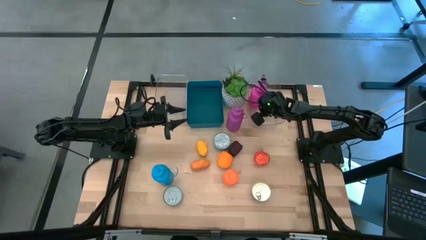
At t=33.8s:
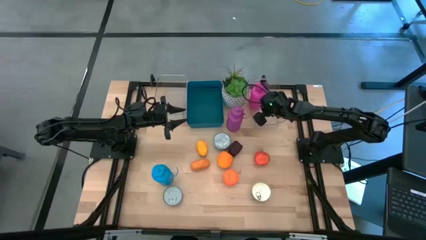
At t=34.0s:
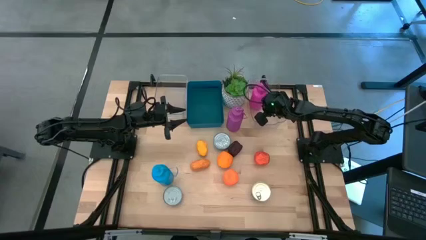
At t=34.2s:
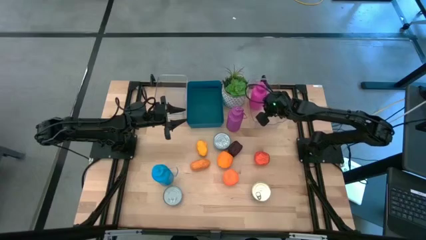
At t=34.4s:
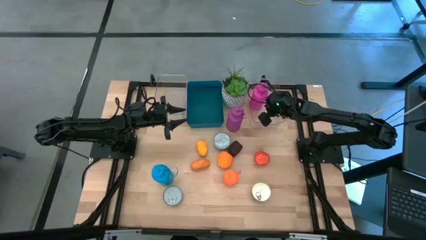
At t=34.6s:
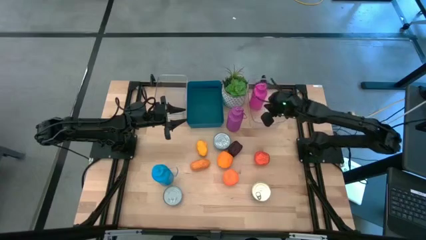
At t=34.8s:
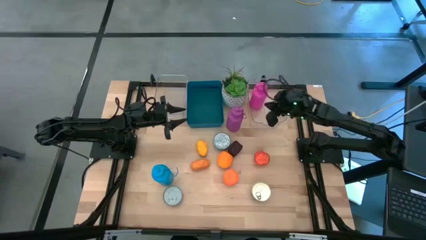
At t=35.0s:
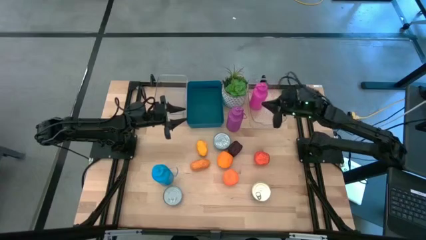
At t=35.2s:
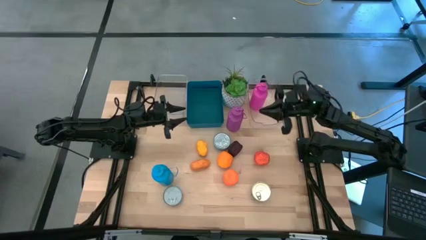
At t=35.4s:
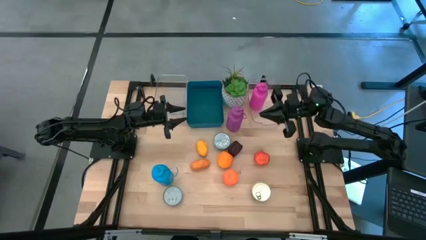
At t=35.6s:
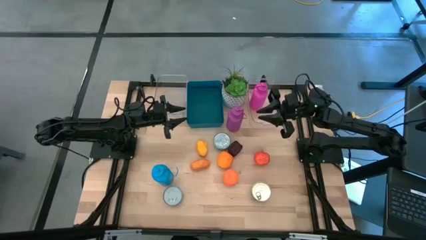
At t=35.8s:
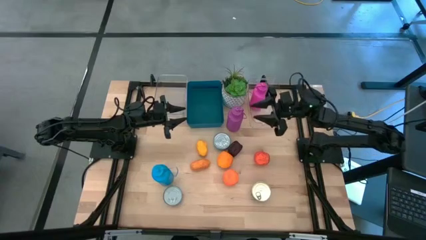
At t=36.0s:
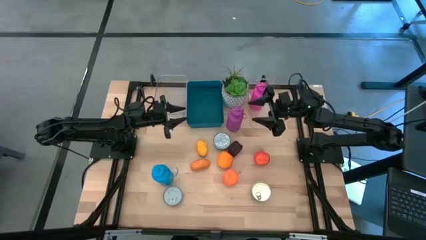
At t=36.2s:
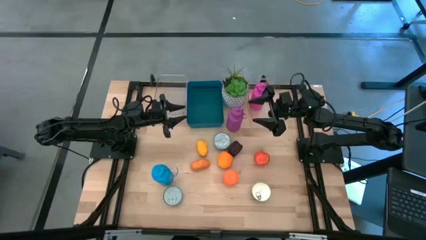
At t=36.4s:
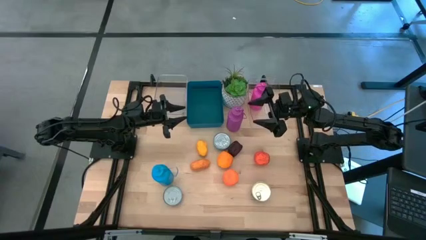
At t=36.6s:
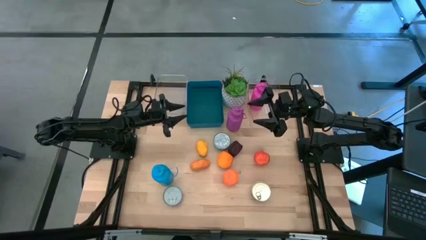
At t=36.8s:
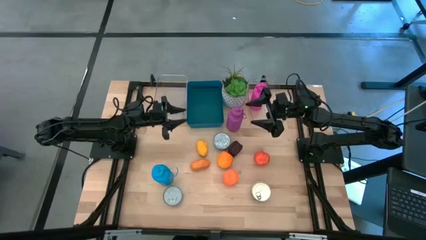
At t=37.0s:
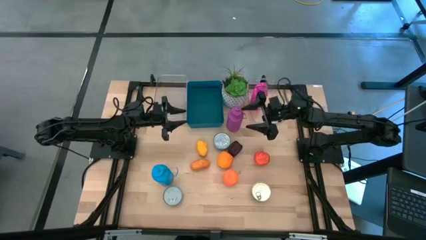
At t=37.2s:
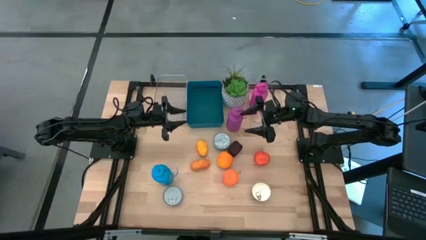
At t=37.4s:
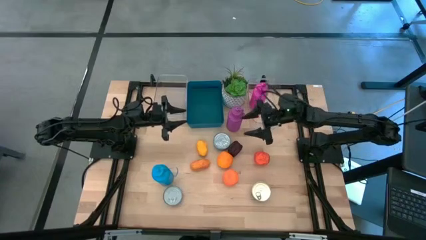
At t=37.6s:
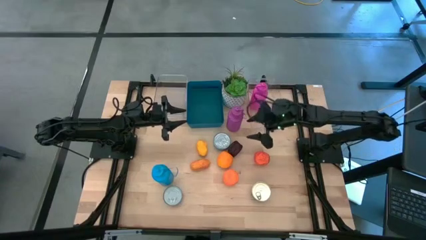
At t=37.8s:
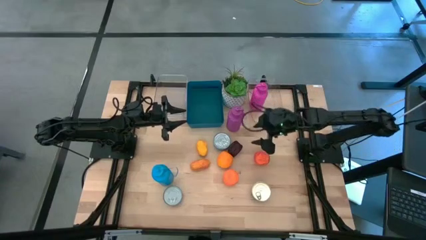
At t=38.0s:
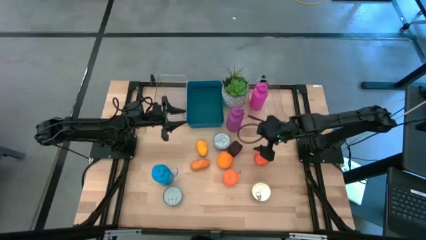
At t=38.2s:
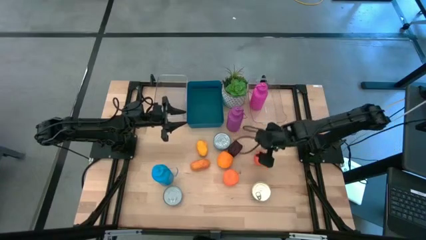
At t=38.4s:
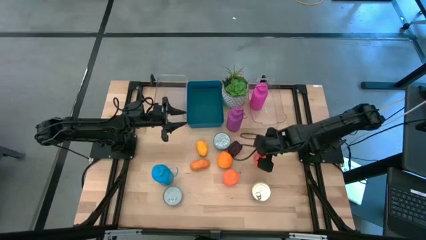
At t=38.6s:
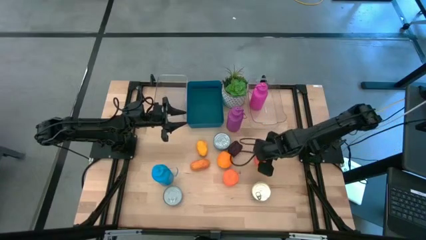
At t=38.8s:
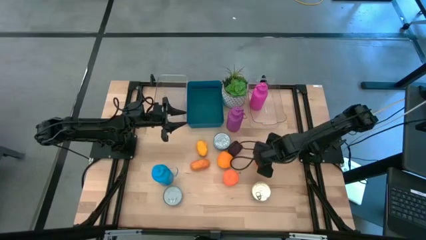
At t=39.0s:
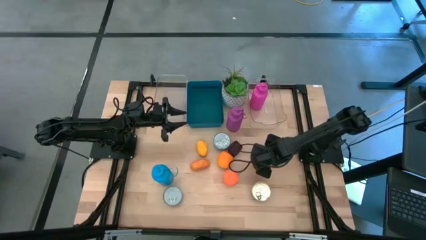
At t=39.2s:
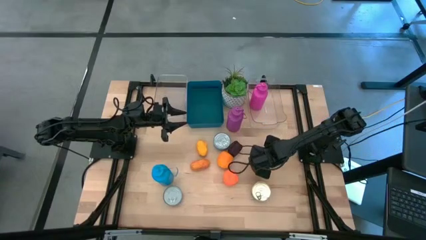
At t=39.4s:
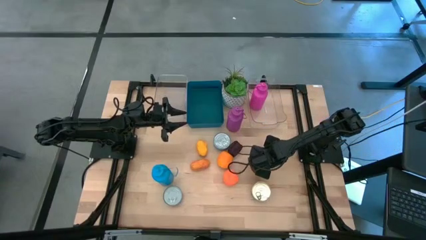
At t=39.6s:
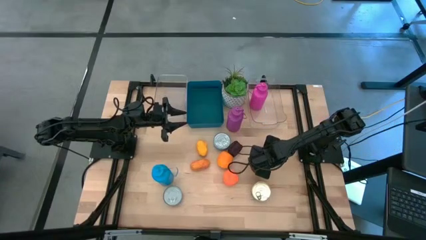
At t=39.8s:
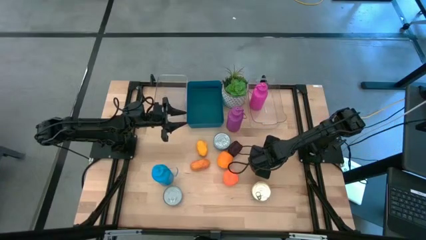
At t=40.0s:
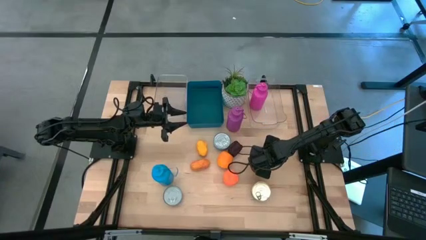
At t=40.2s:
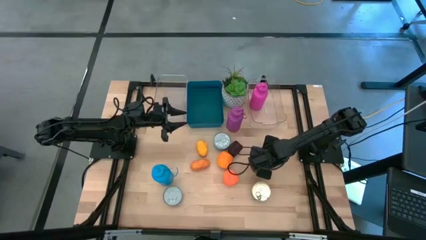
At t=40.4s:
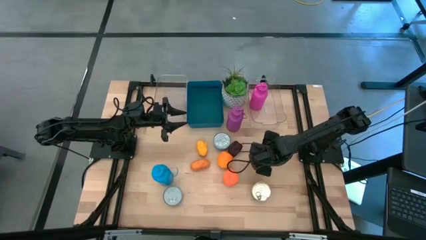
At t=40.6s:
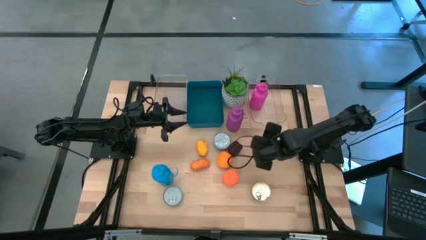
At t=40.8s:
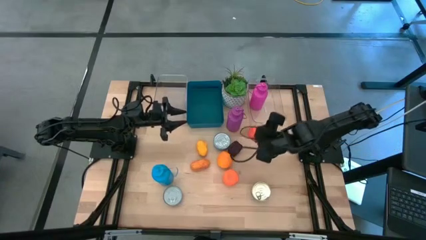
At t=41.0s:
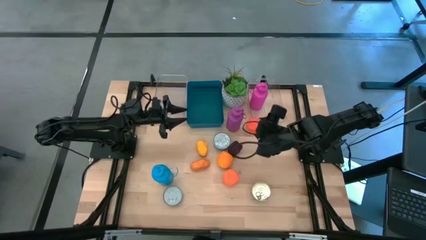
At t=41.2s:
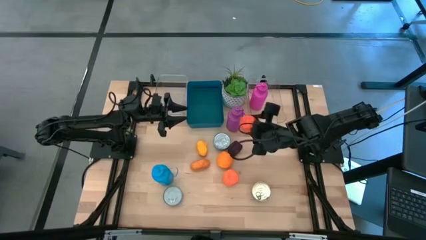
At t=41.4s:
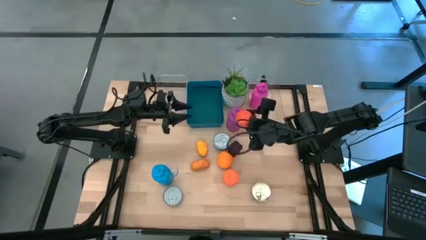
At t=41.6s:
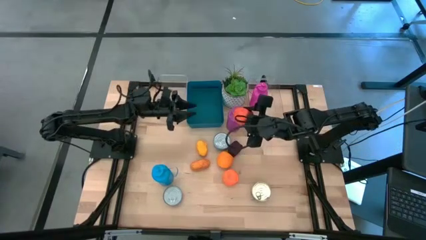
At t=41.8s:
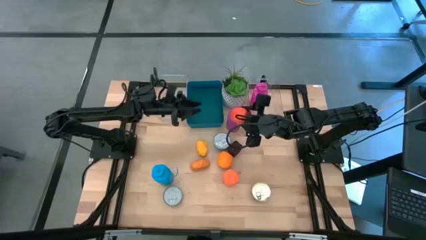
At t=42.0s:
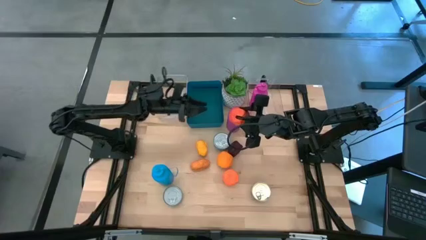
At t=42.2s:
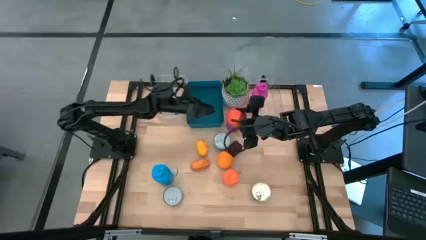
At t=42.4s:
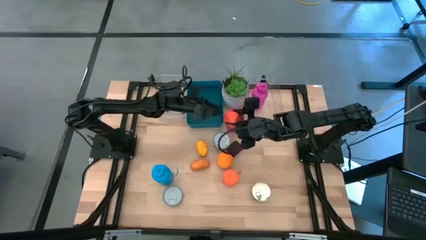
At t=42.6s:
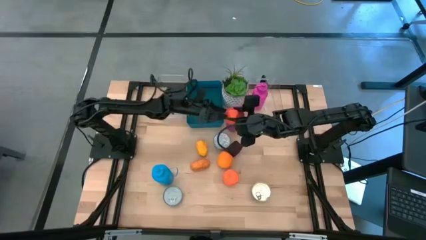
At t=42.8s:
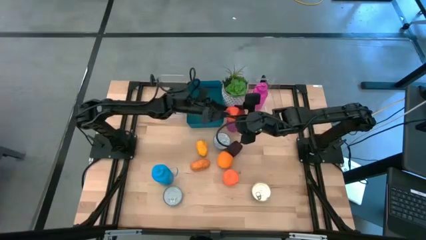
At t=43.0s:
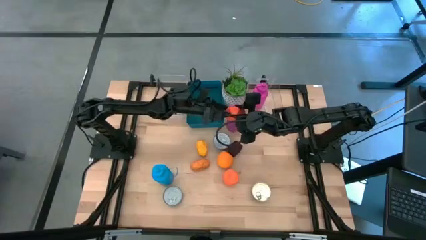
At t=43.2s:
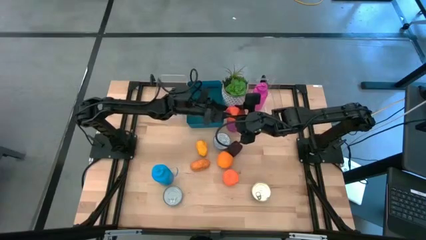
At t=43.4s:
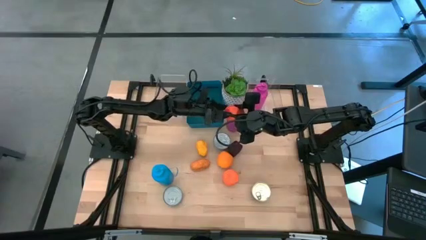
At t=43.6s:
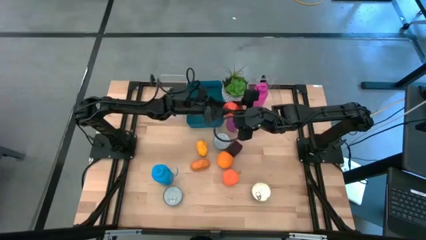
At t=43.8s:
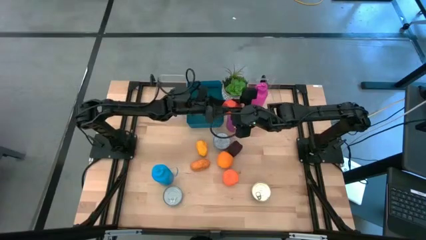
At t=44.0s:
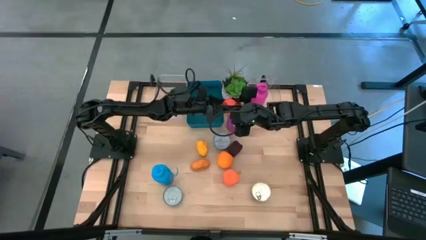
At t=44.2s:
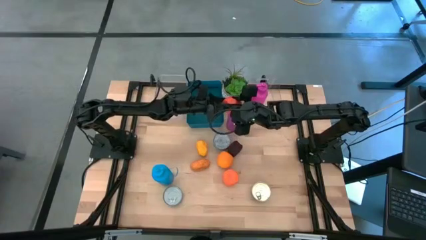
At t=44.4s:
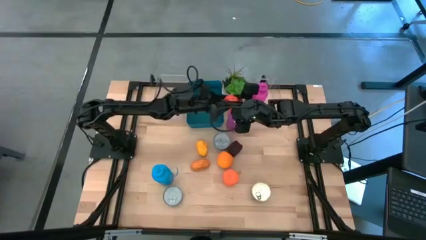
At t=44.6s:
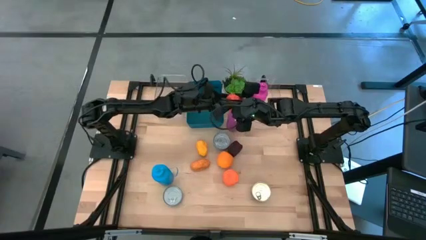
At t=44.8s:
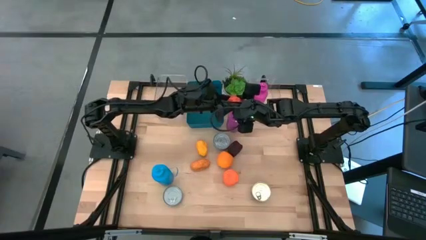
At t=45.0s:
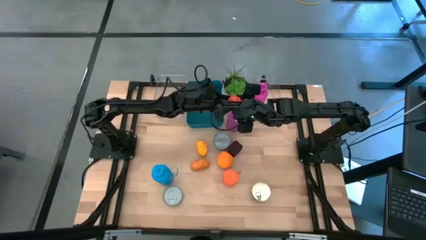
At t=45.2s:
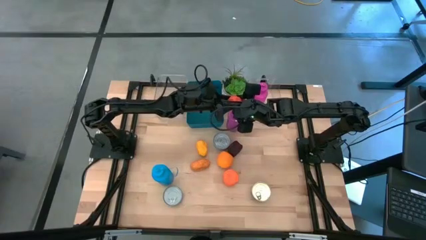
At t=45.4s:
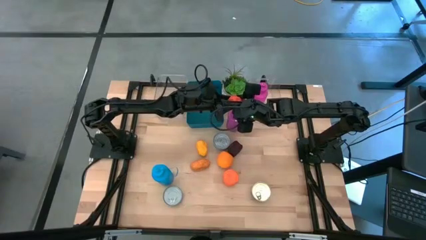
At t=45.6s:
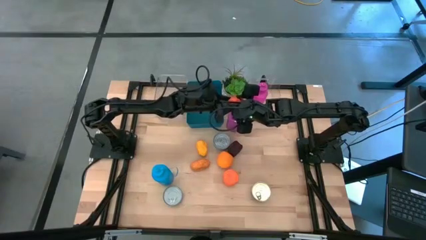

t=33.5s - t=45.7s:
Task: Pick & Place Food Item
Put the orange into the left transparent bin

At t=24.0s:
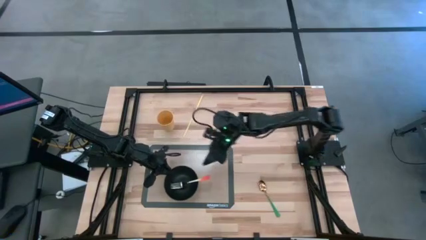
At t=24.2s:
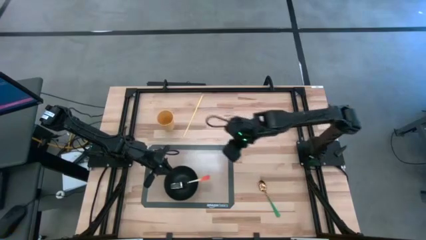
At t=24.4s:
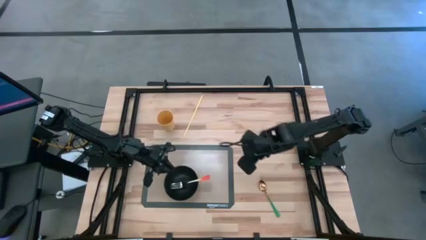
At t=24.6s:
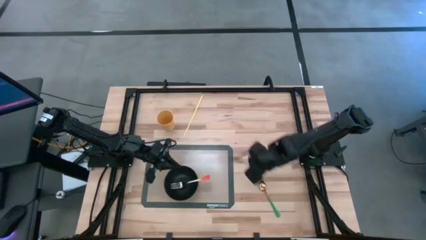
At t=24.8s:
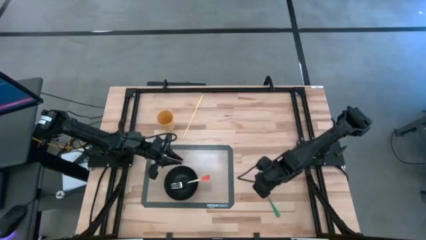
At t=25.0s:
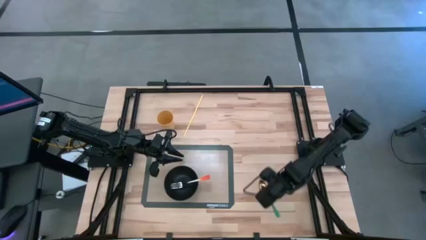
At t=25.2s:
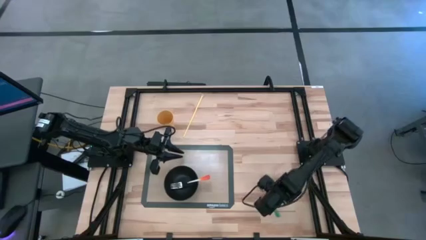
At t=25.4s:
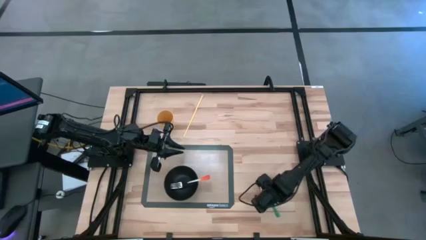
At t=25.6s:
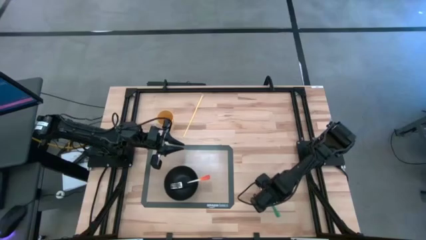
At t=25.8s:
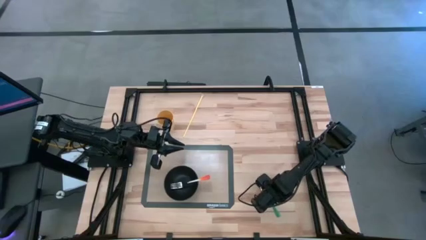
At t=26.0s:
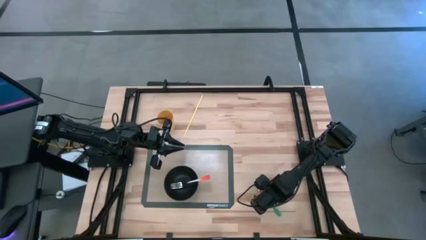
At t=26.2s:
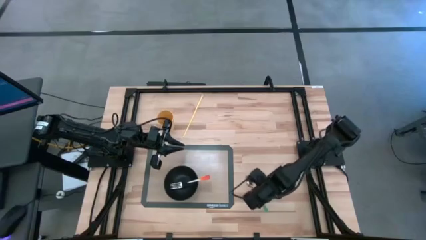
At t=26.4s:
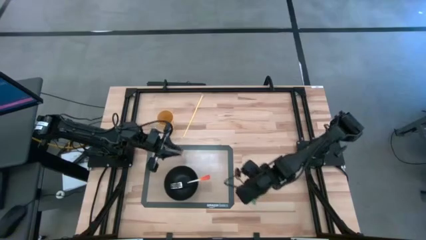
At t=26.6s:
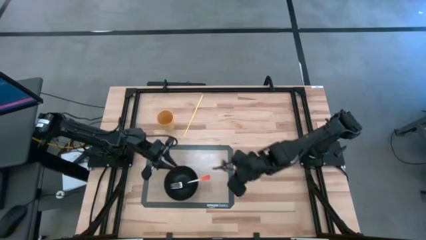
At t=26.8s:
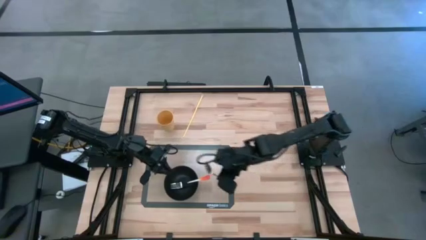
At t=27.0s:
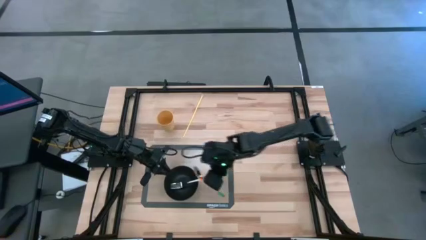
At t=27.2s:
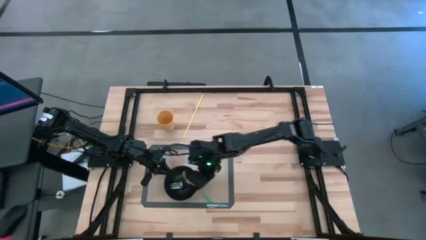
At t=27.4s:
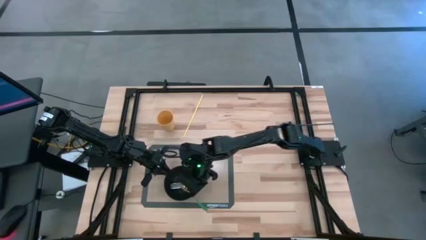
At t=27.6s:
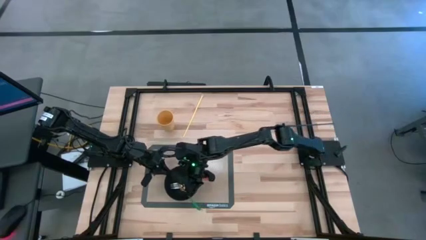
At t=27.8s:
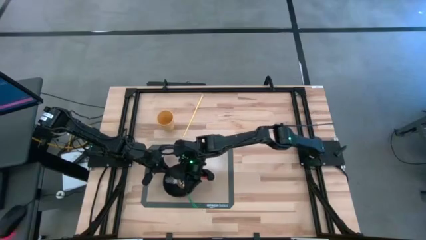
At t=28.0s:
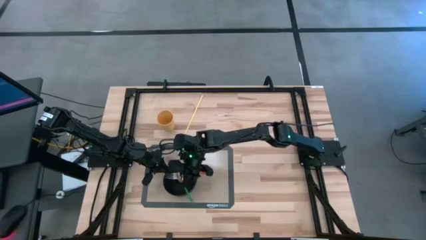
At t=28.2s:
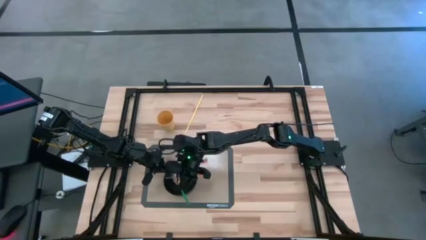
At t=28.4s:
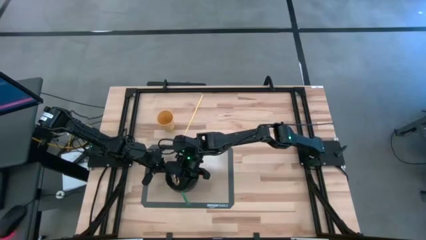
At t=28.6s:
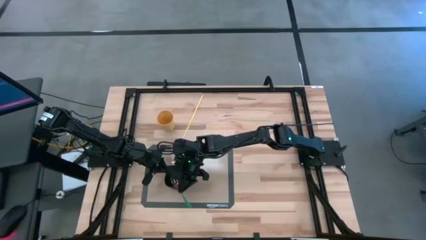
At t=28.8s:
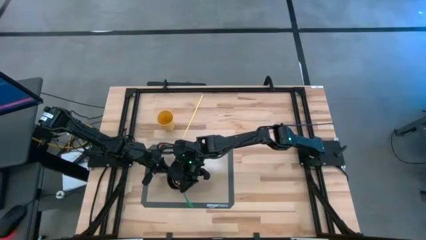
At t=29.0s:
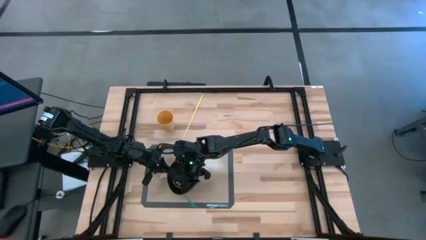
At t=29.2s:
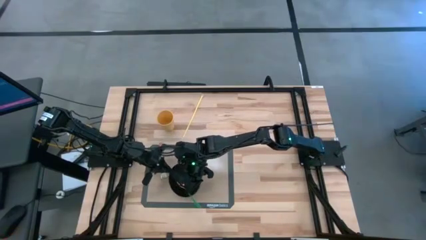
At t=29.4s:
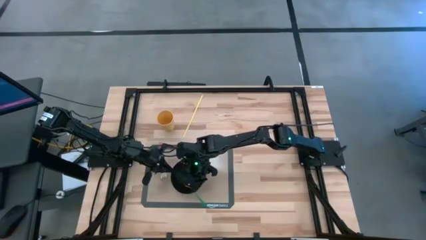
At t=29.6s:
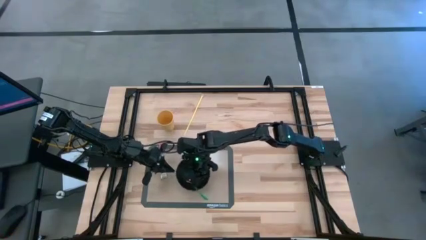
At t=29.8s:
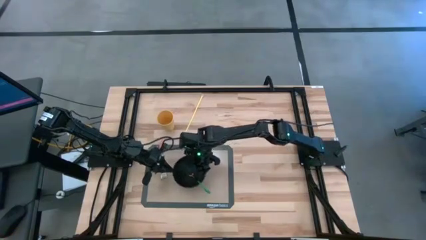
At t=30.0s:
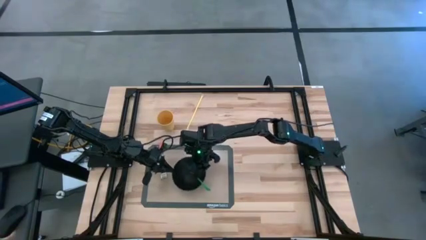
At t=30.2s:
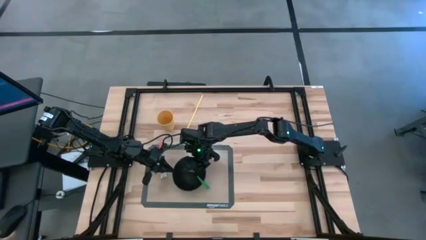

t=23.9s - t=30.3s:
Task: Pick & Place Utensil
Put the green spoon into the black bowl
